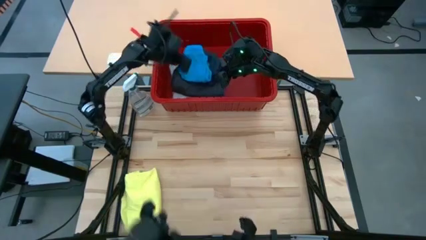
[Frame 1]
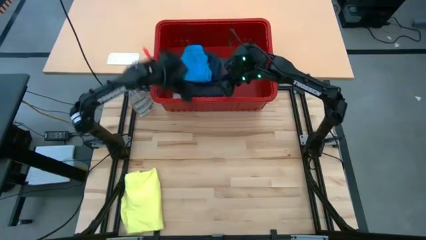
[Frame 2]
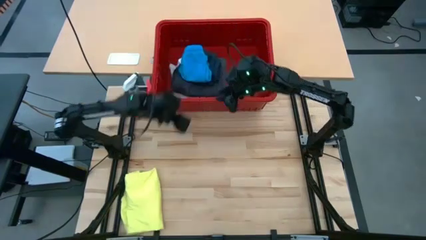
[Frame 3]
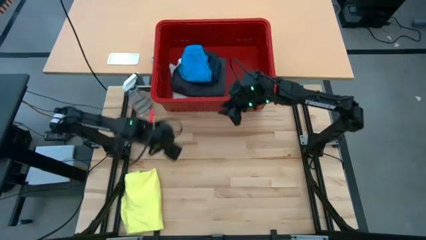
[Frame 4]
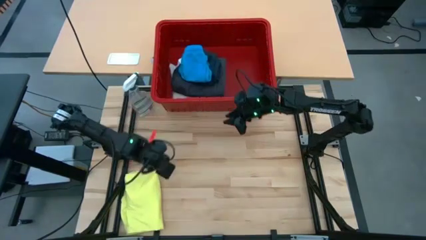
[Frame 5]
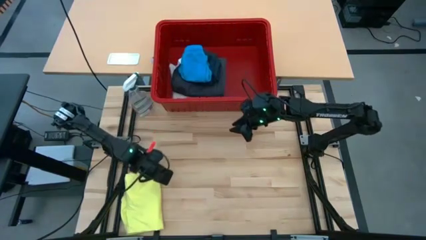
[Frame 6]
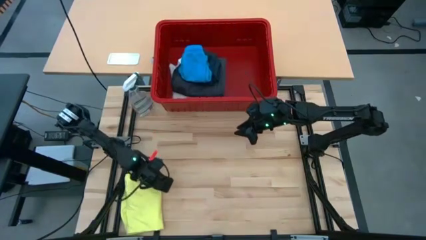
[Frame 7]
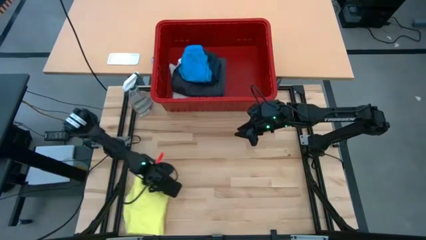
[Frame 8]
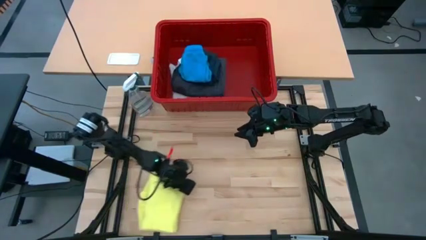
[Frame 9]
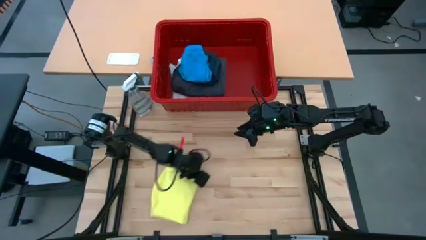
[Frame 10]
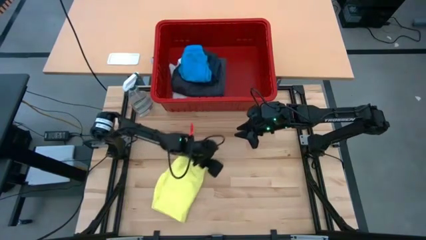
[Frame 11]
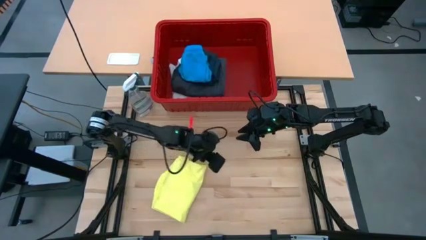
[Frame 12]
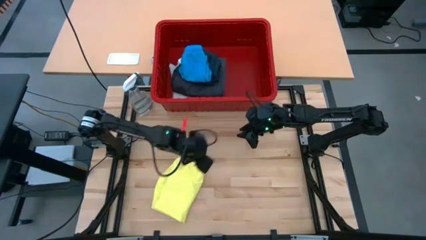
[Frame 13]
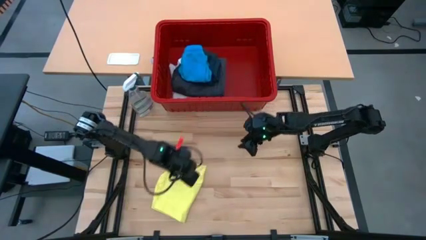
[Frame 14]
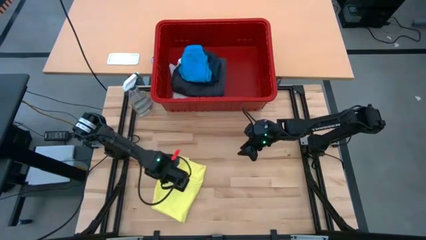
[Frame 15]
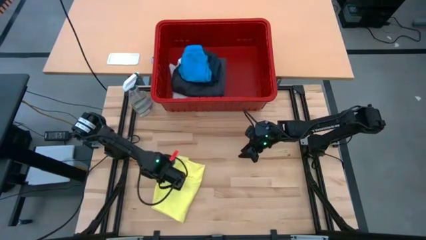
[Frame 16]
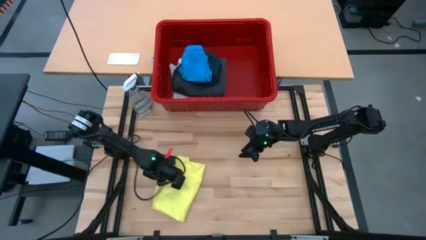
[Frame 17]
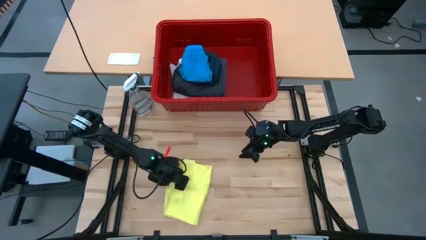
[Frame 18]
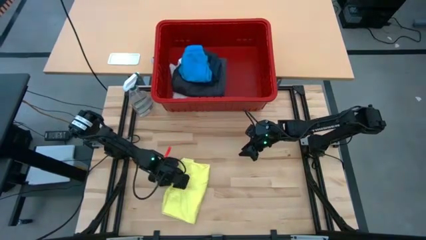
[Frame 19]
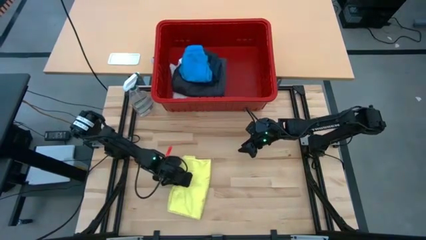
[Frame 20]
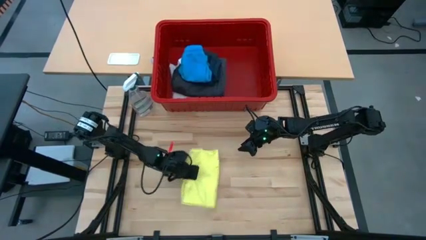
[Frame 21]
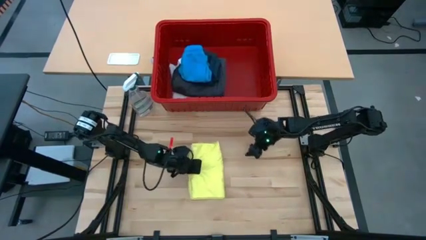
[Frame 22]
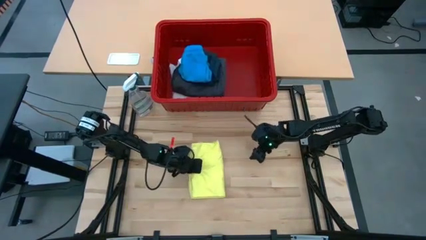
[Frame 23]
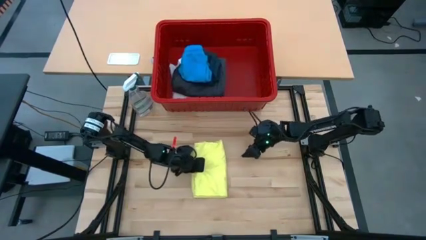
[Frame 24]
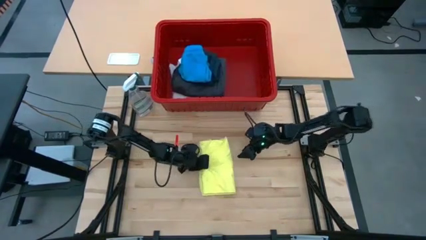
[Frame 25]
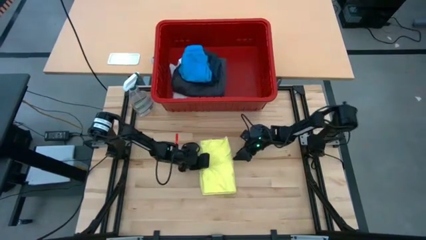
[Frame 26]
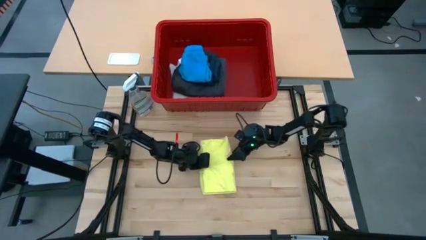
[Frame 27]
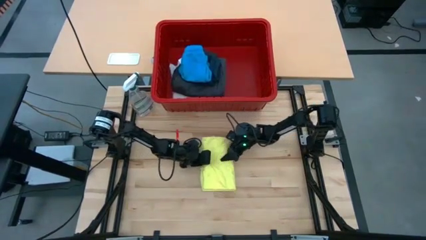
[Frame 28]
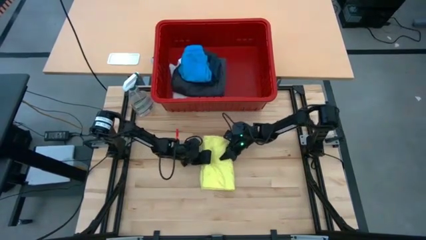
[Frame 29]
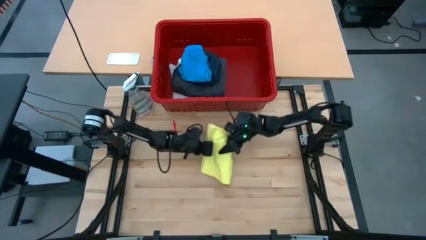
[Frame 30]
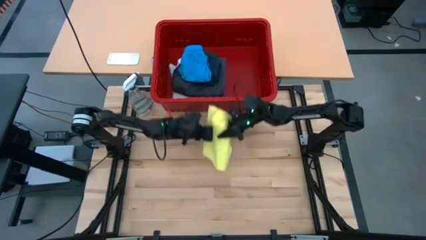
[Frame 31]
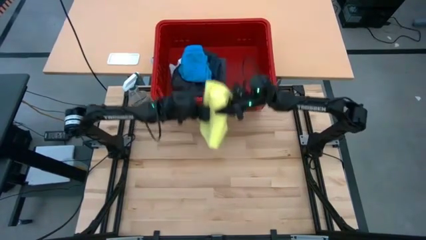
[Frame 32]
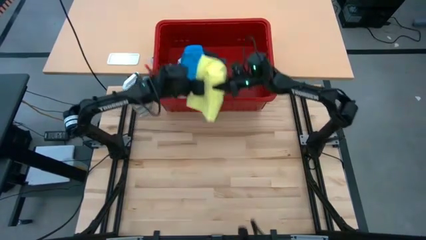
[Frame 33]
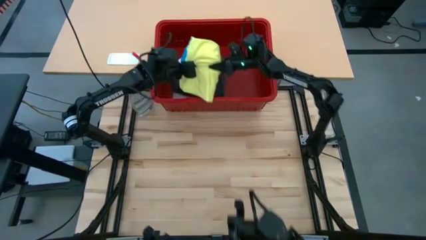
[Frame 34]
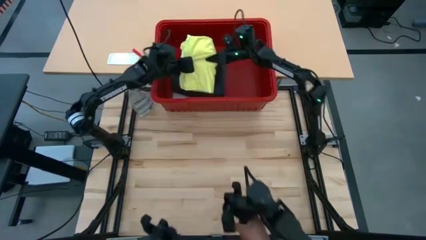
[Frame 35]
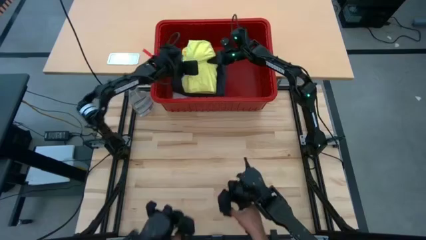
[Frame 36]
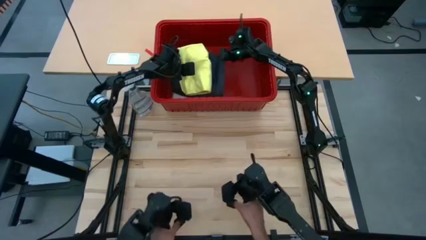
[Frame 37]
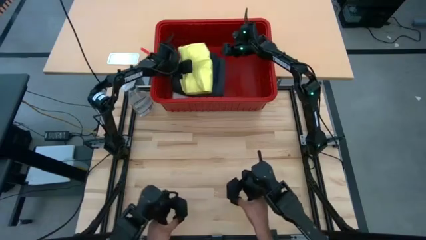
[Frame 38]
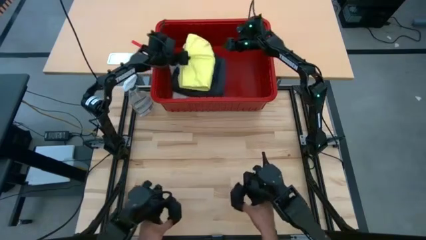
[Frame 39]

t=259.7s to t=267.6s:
Task: Fold laundry
Put the folded yellow shirt into the red laundry bin

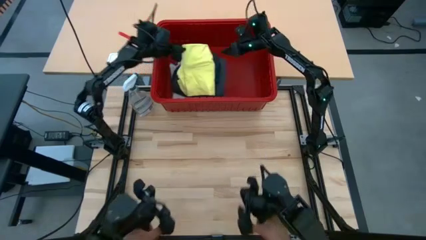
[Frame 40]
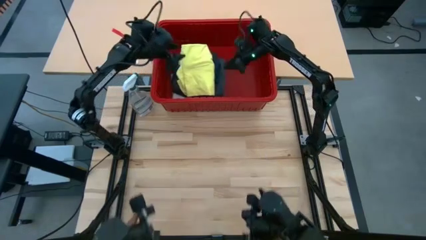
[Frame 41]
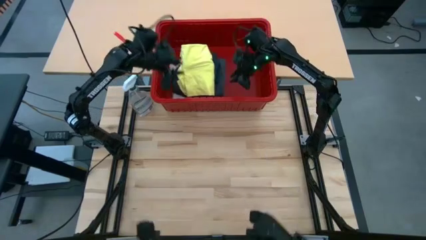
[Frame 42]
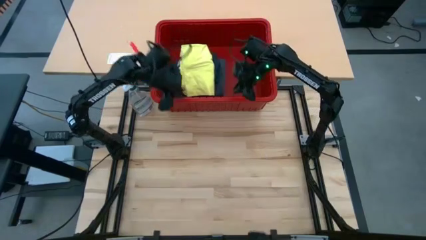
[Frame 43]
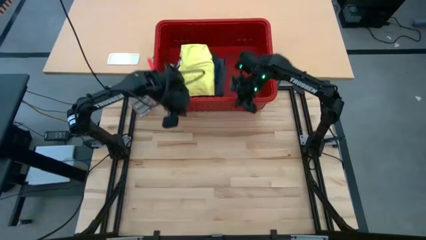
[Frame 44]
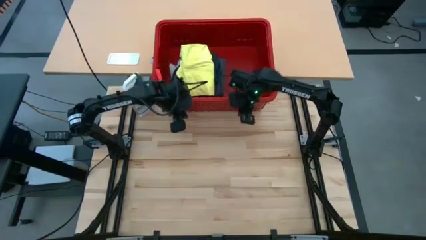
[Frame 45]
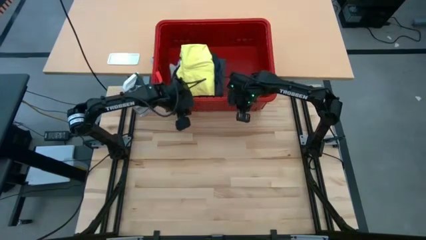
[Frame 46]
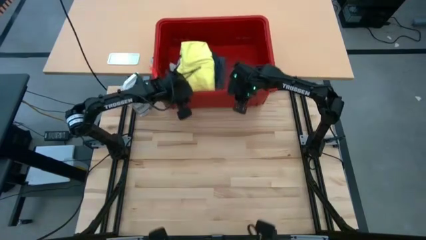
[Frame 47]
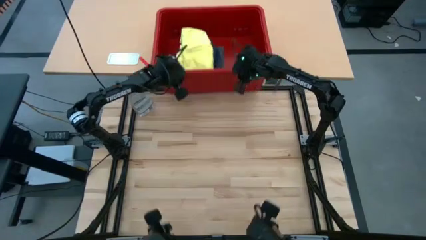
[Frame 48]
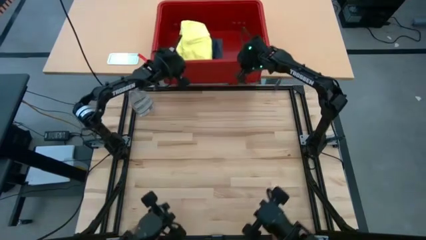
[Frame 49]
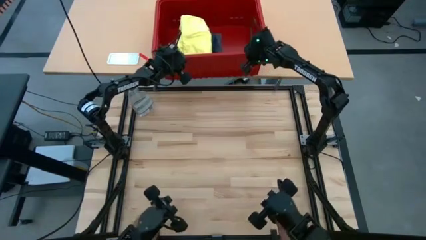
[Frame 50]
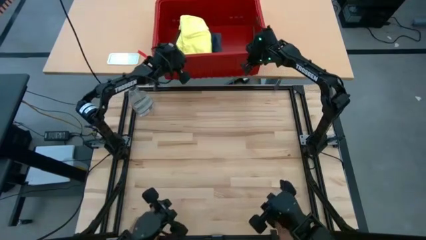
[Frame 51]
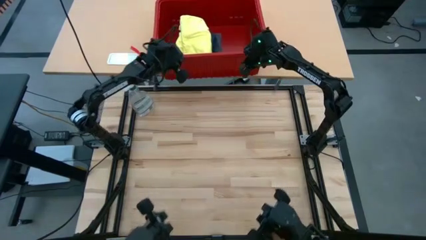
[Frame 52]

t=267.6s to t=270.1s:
Adjust the red laundry bin
